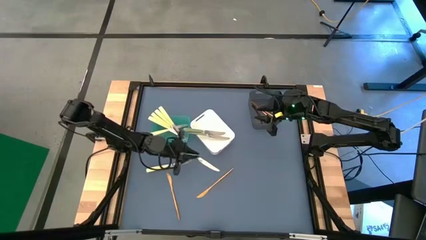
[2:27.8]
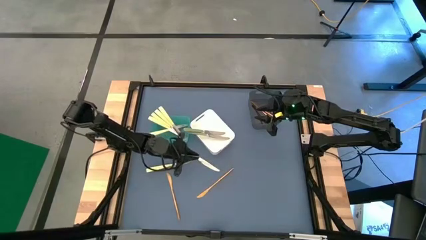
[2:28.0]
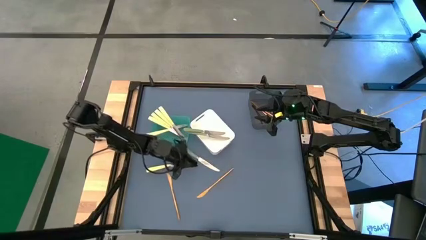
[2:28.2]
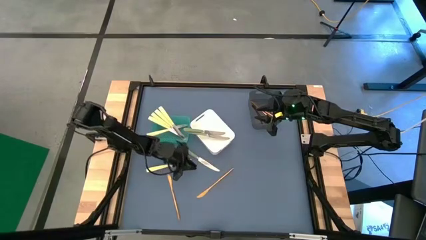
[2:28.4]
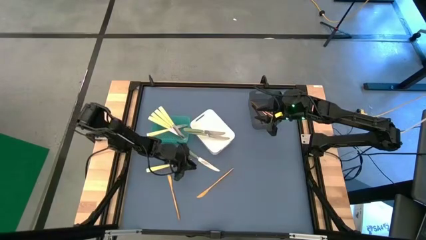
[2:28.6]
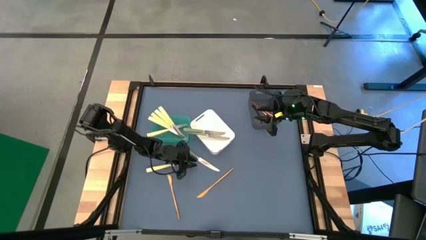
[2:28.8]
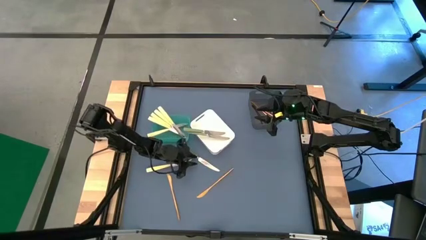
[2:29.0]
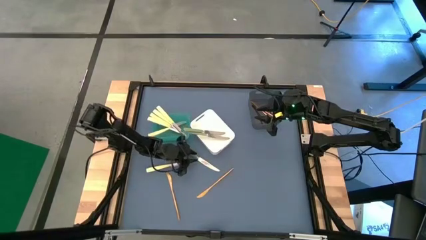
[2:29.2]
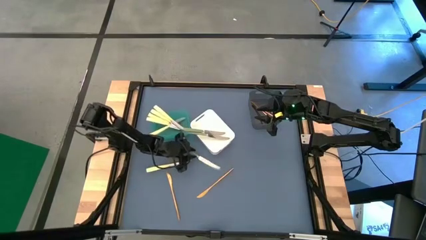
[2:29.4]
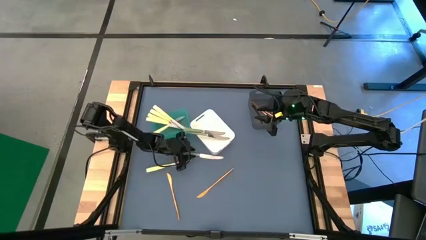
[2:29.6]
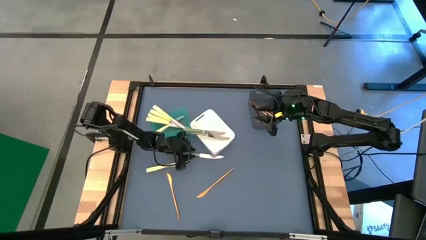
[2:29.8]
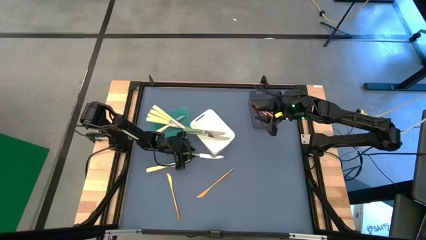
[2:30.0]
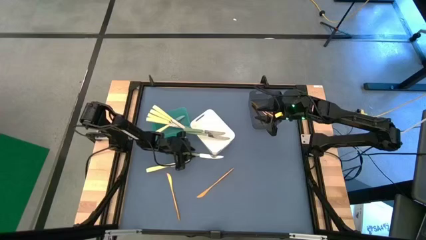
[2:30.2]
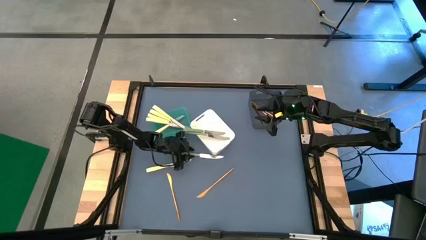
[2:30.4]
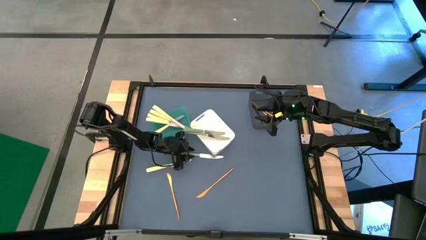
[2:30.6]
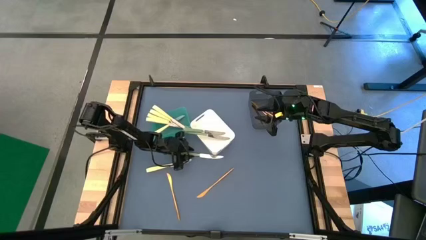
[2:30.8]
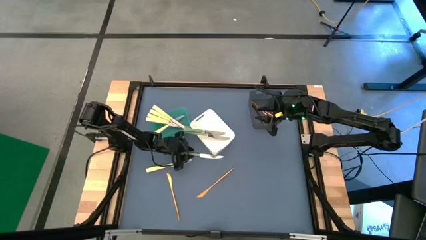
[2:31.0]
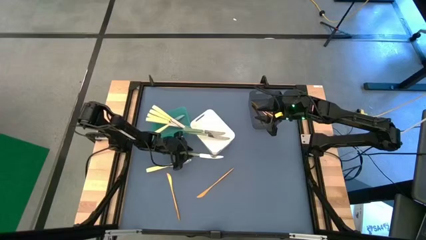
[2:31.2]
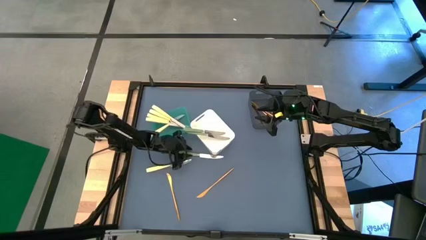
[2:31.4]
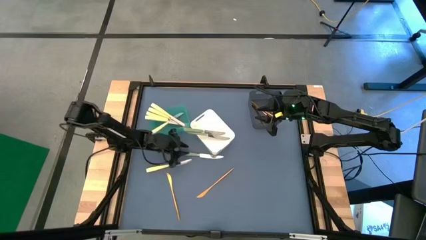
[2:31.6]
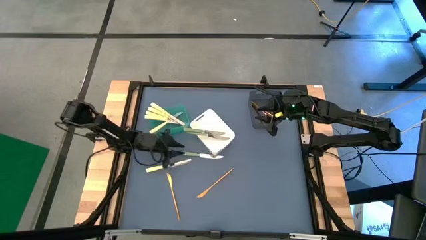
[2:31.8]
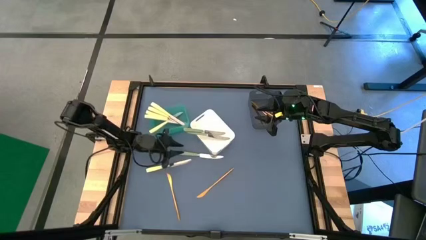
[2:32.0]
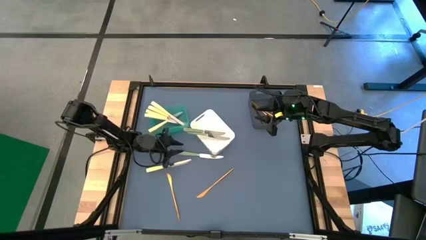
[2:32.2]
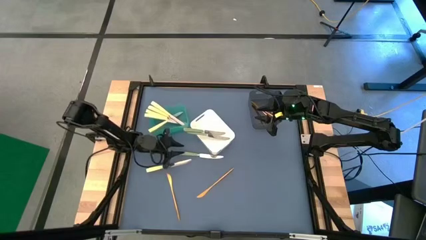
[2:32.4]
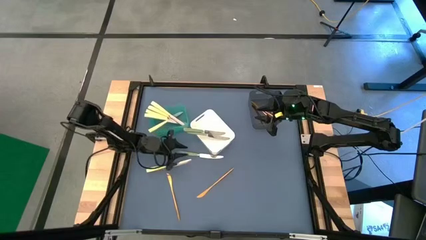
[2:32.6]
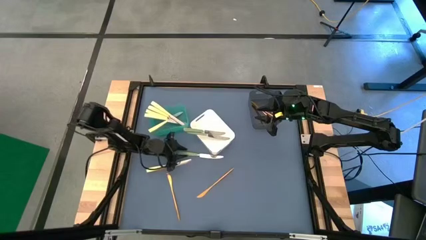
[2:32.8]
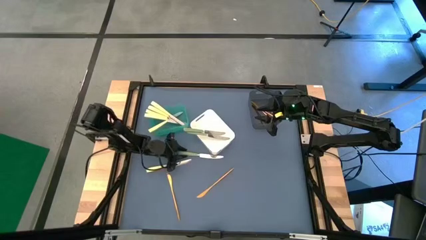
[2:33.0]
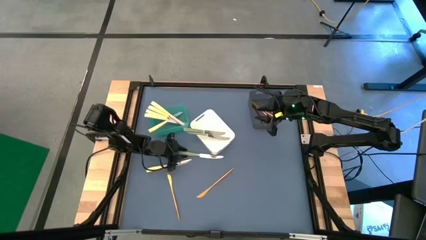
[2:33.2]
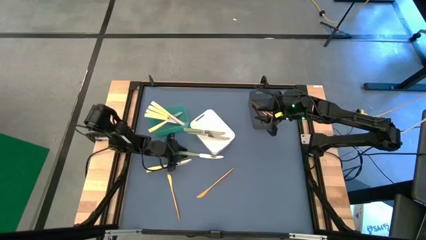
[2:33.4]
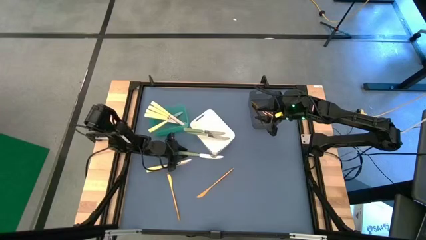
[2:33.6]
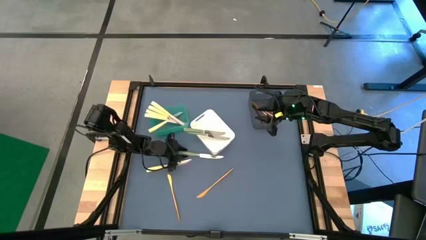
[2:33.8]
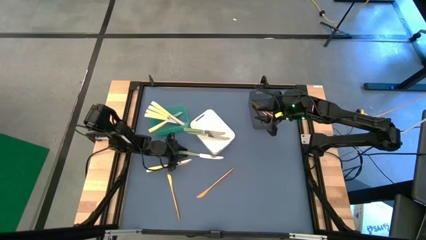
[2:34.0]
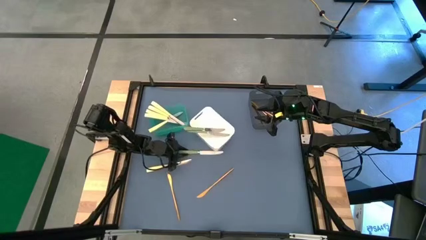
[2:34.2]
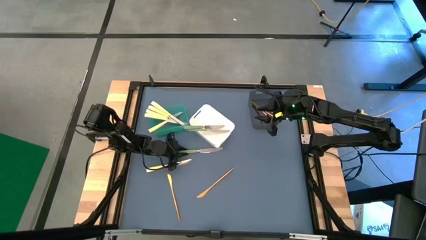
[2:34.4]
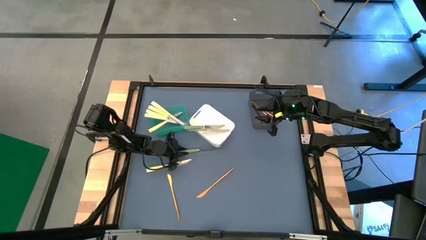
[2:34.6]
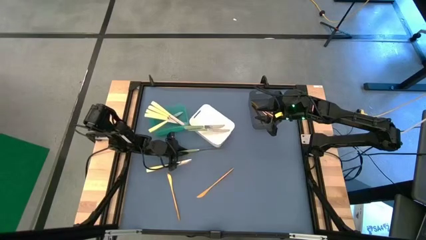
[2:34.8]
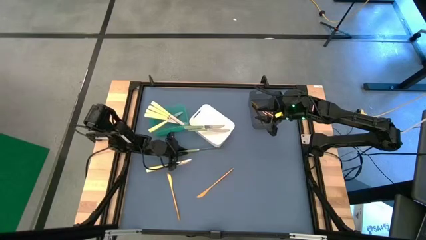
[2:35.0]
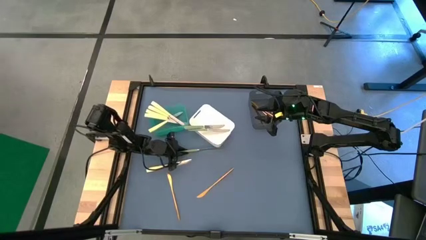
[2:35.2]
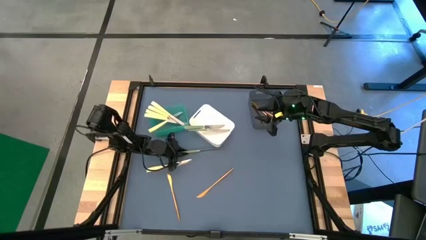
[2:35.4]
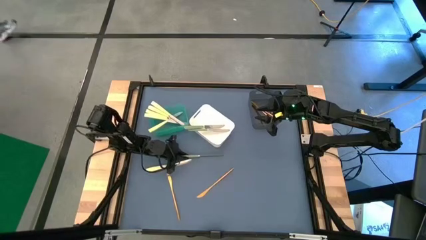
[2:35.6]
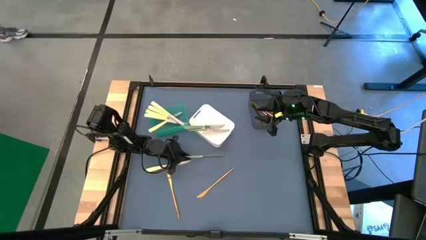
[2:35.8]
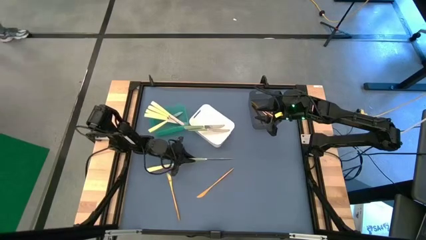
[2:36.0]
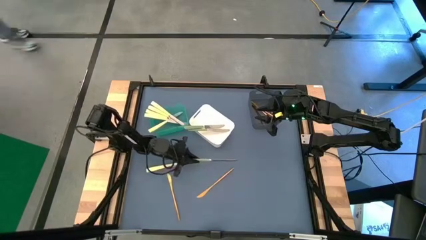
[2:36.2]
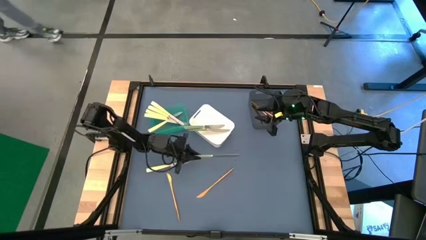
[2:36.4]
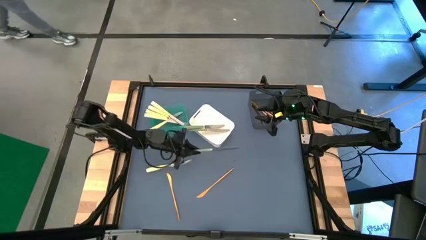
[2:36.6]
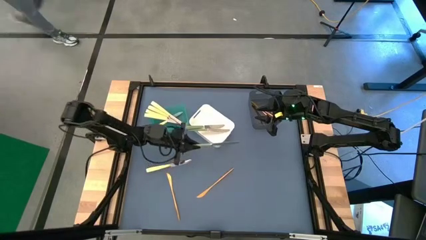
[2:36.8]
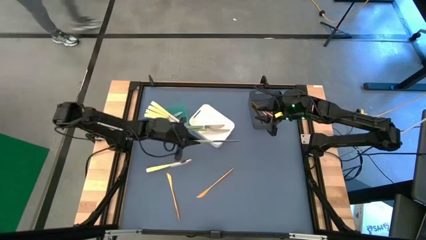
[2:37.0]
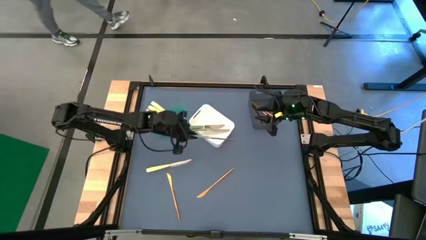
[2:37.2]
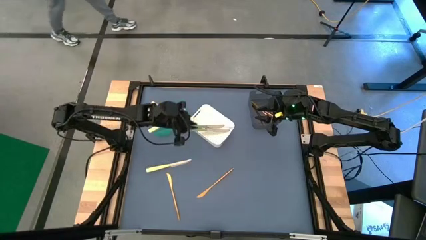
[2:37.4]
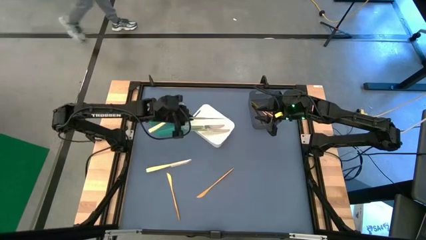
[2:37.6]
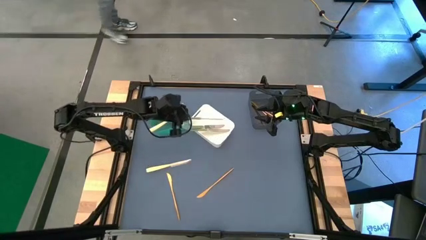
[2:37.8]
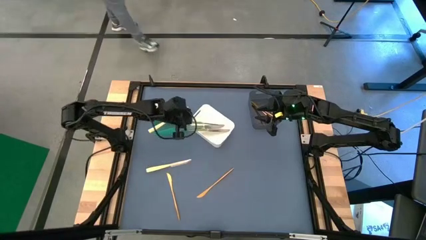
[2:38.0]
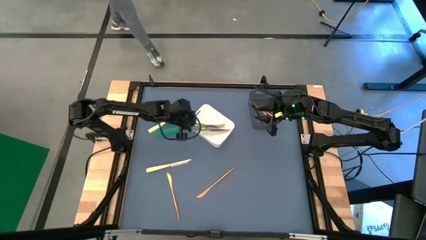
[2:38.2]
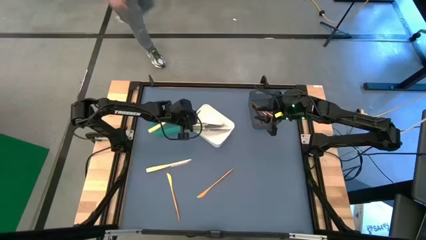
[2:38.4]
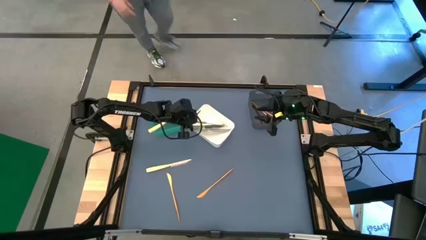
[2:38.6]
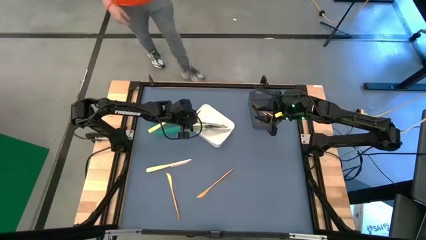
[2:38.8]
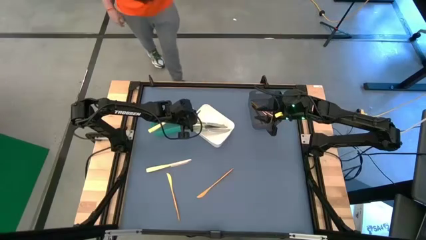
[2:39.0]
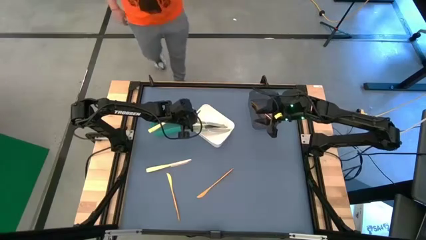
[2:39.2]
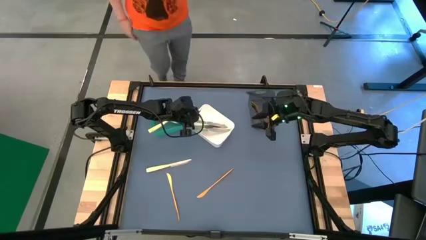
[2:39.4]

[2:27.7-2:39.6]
Task: Sort silverware by color (type)
Put the green table knife into the white bin
